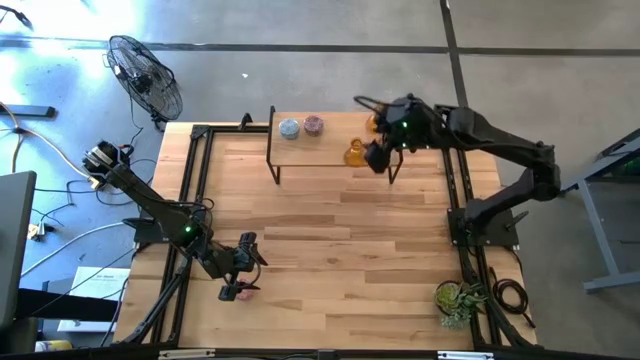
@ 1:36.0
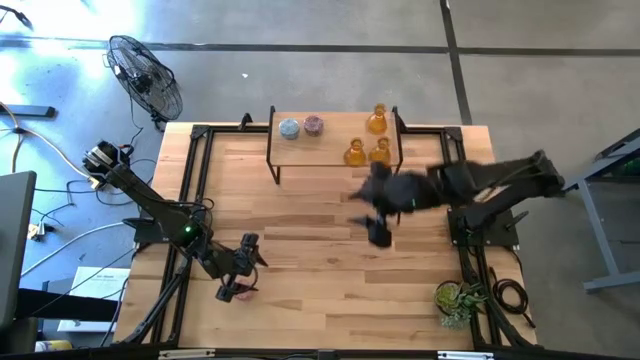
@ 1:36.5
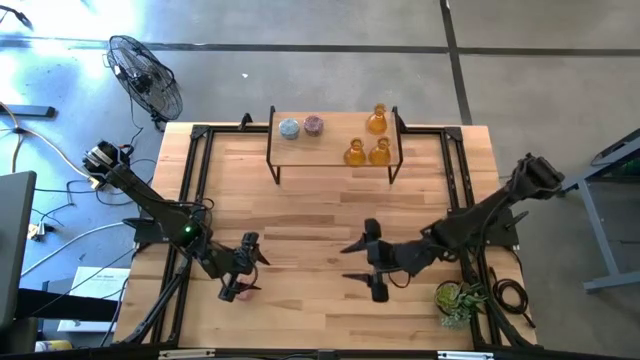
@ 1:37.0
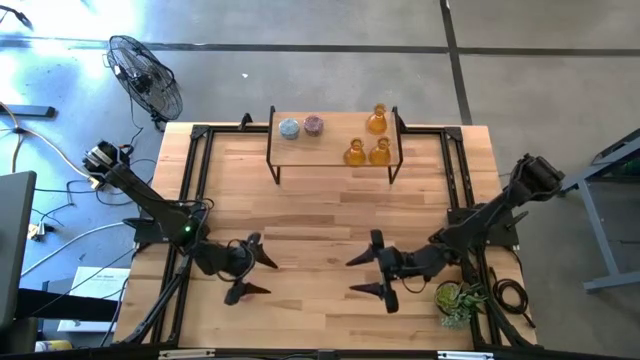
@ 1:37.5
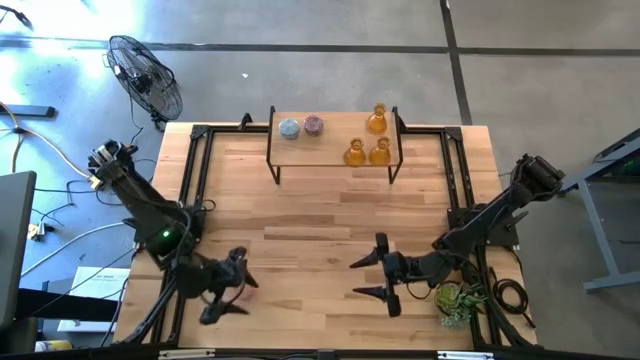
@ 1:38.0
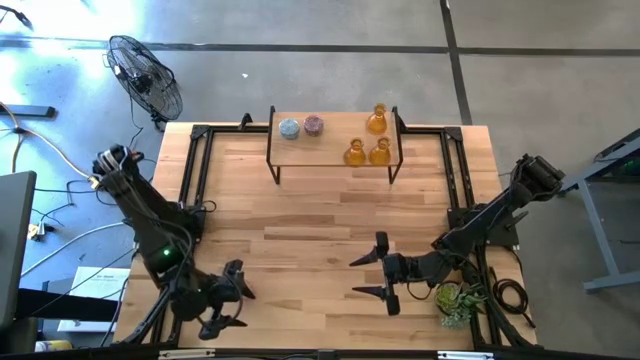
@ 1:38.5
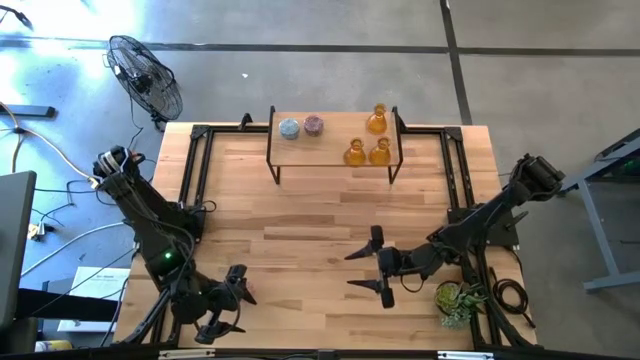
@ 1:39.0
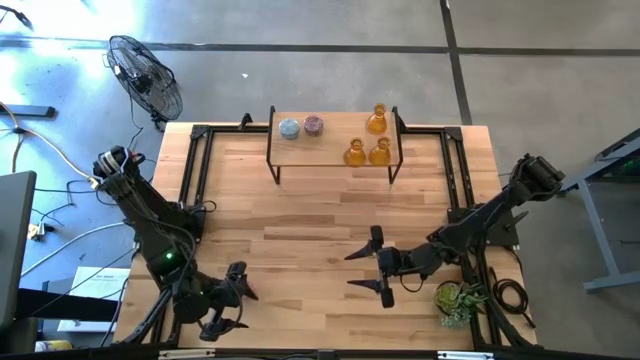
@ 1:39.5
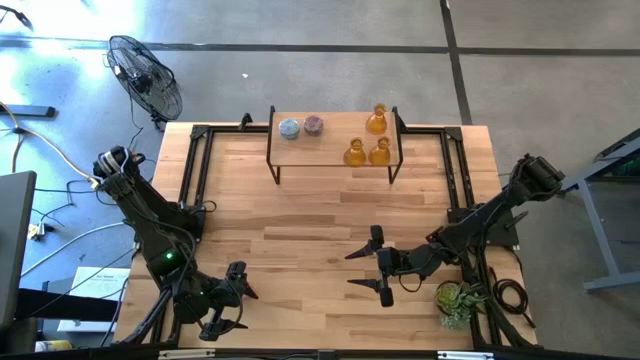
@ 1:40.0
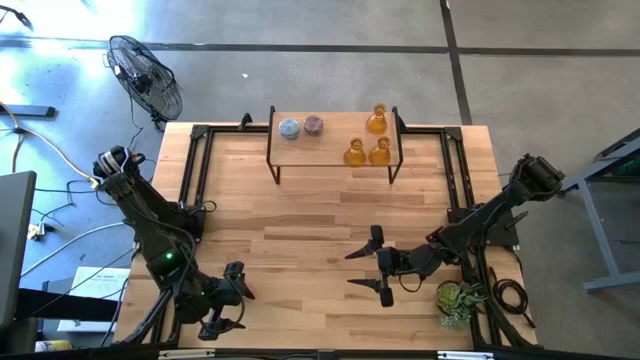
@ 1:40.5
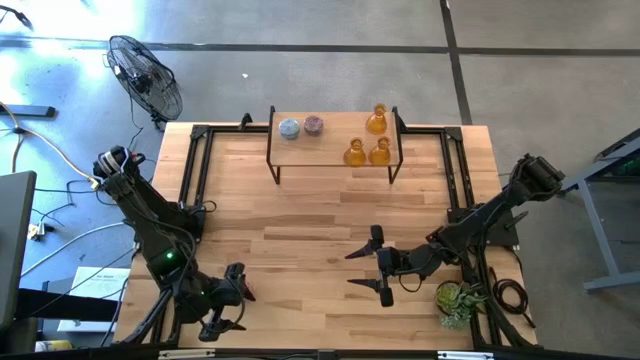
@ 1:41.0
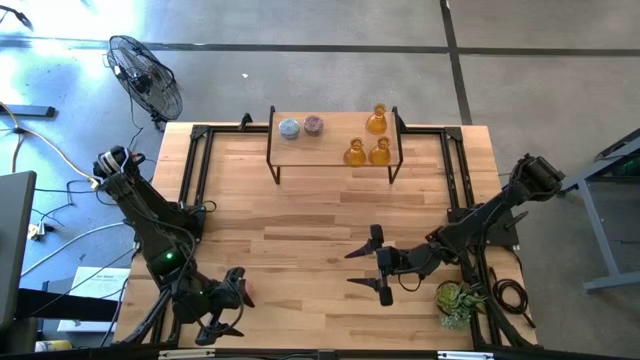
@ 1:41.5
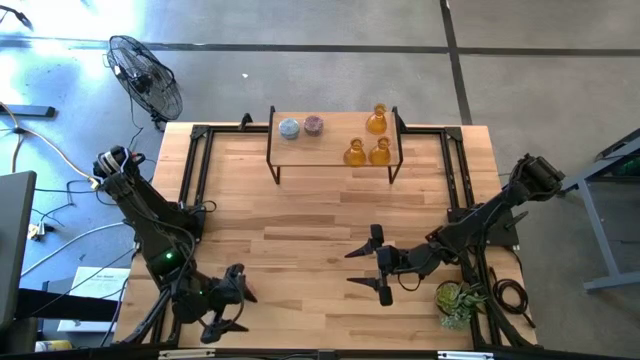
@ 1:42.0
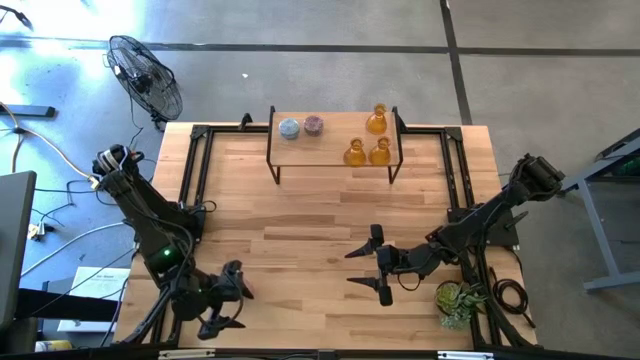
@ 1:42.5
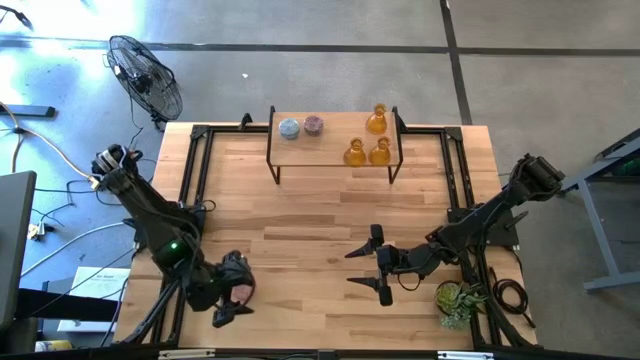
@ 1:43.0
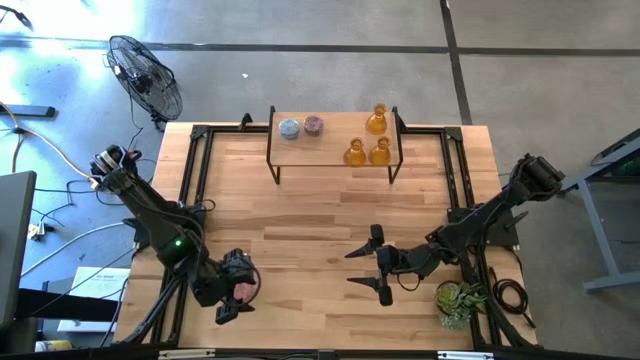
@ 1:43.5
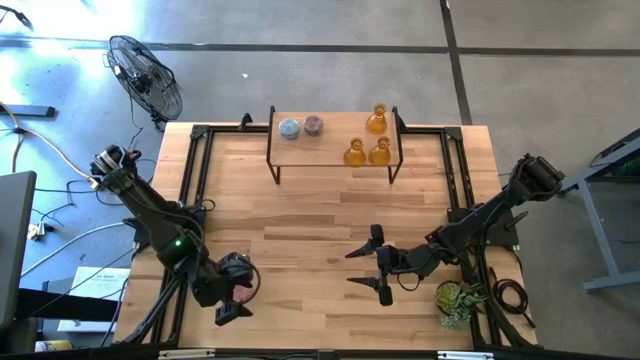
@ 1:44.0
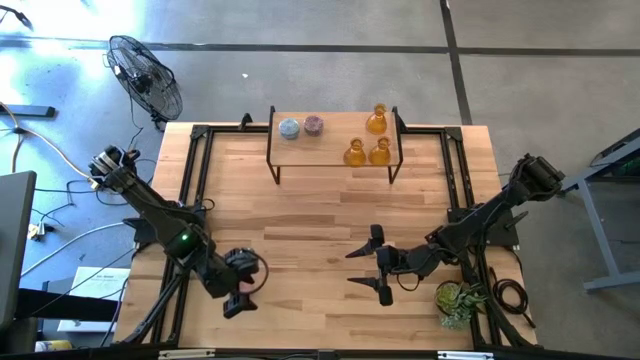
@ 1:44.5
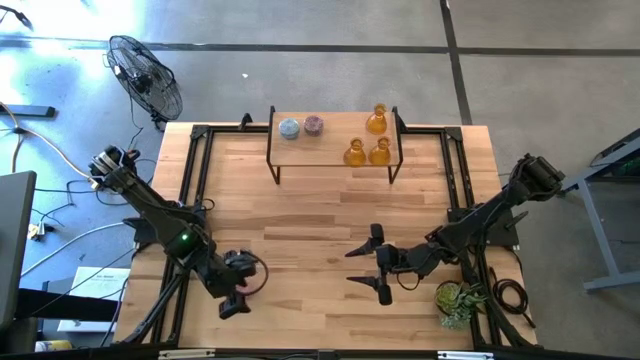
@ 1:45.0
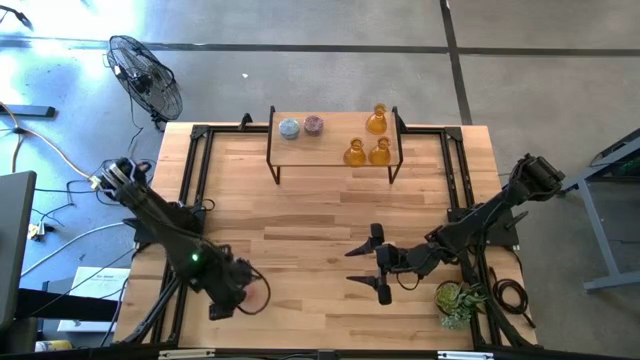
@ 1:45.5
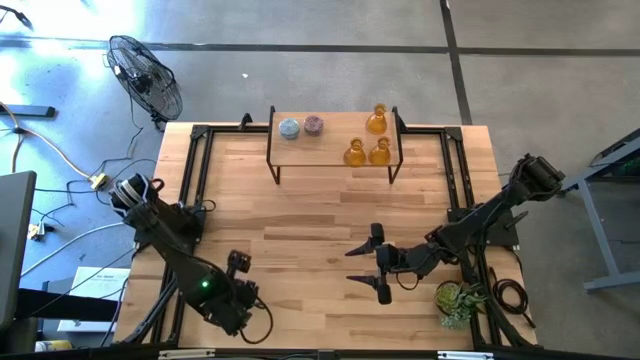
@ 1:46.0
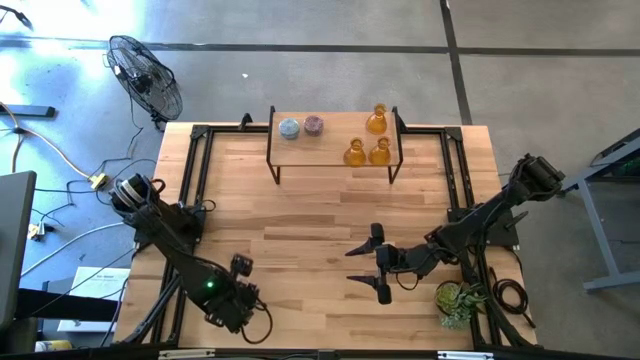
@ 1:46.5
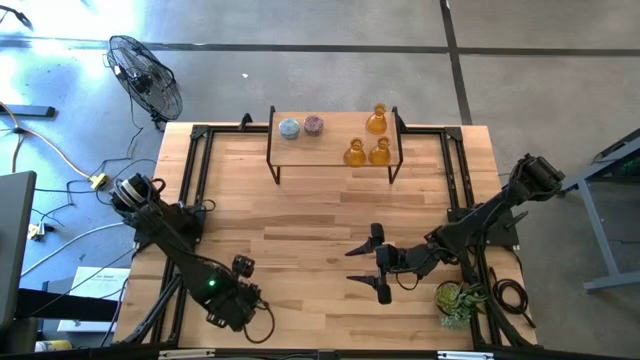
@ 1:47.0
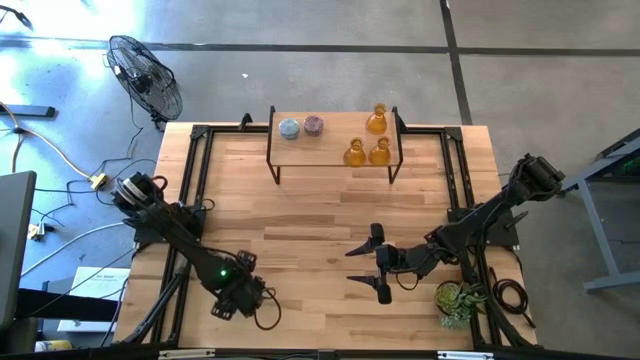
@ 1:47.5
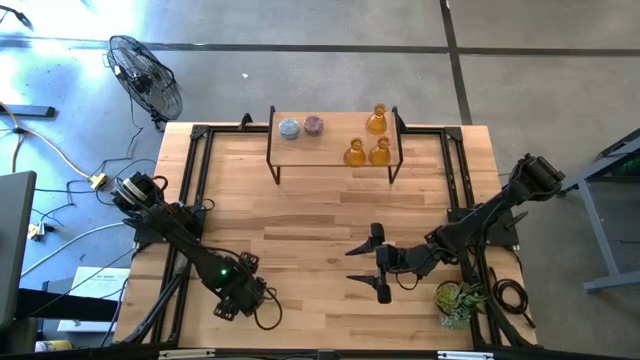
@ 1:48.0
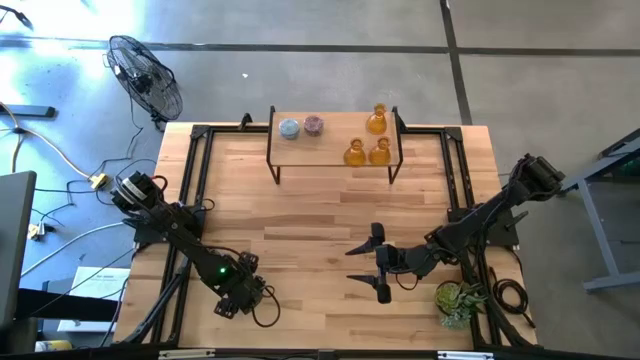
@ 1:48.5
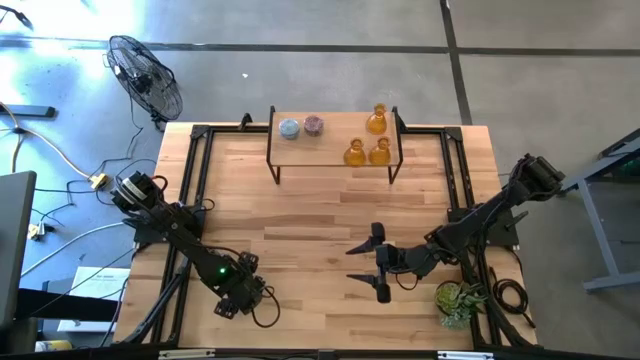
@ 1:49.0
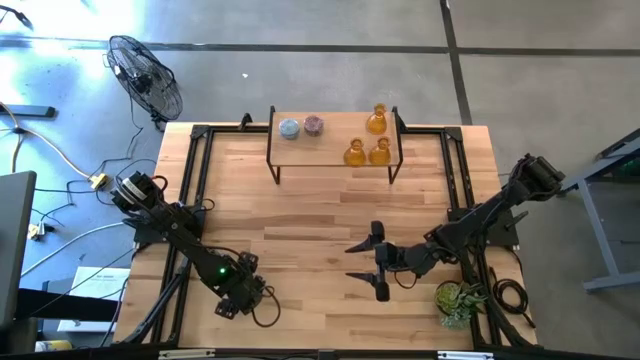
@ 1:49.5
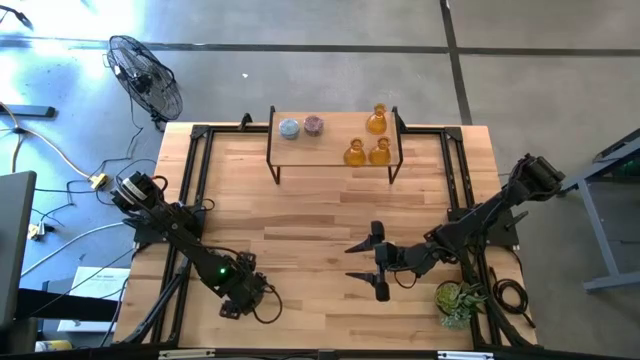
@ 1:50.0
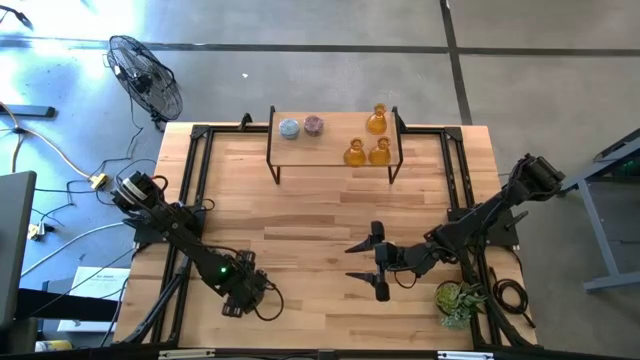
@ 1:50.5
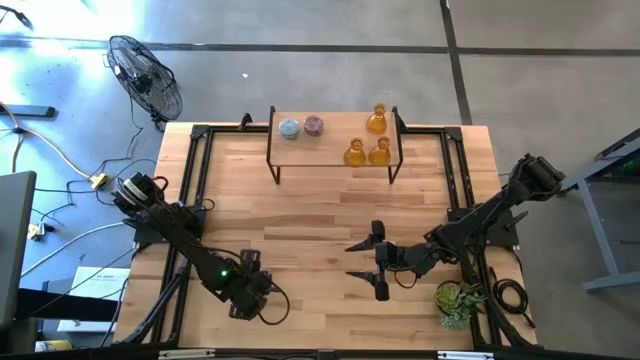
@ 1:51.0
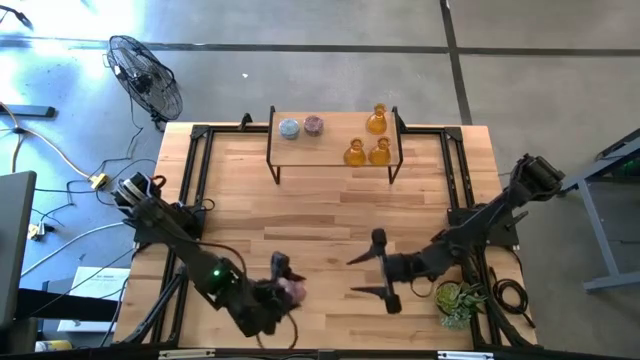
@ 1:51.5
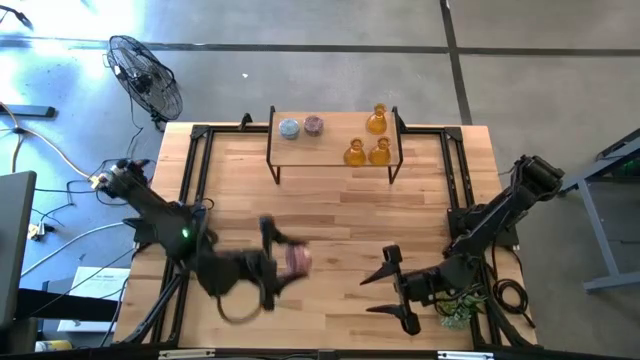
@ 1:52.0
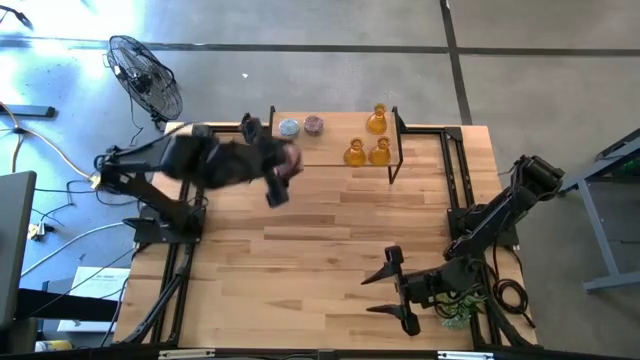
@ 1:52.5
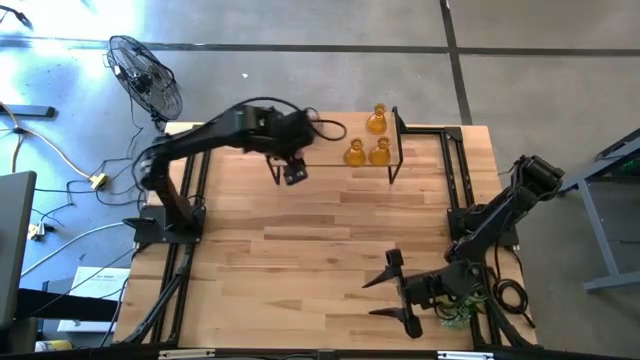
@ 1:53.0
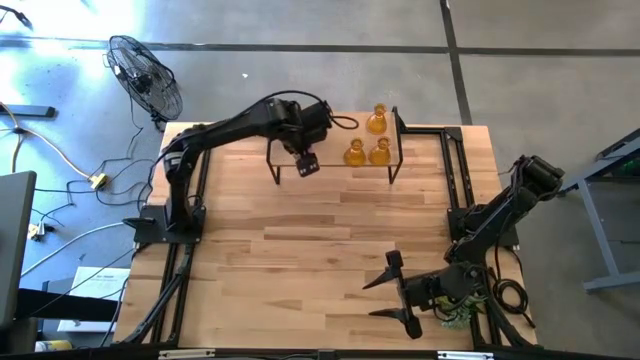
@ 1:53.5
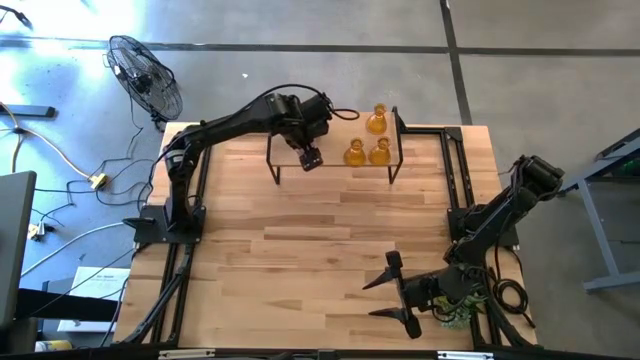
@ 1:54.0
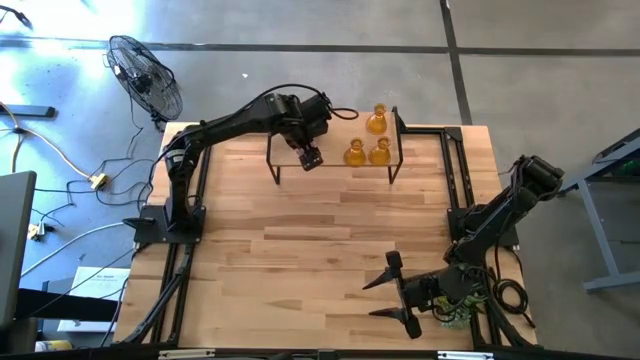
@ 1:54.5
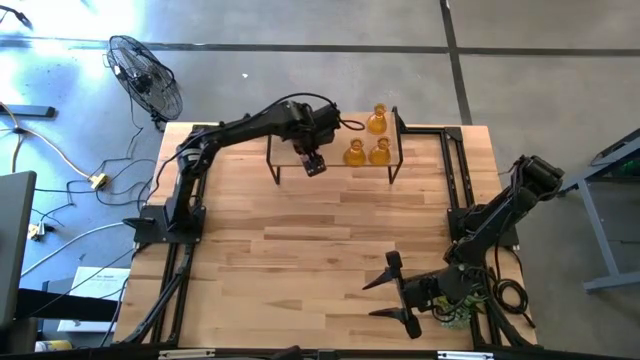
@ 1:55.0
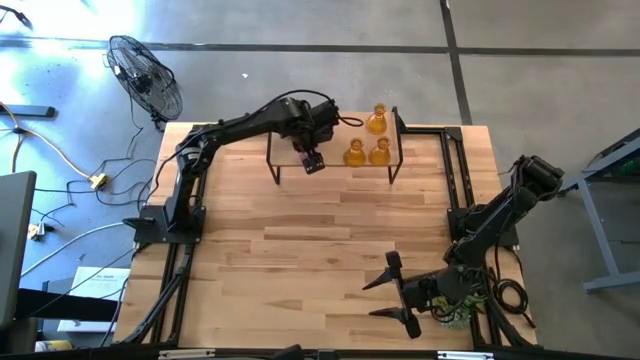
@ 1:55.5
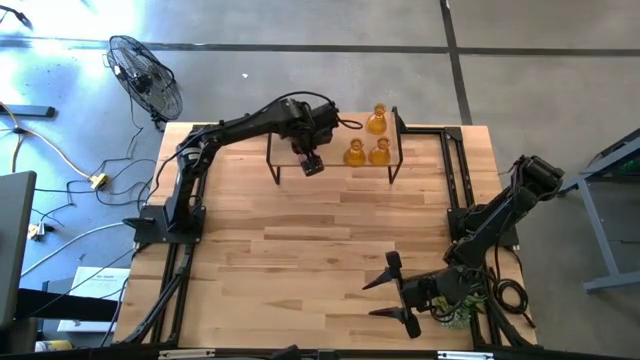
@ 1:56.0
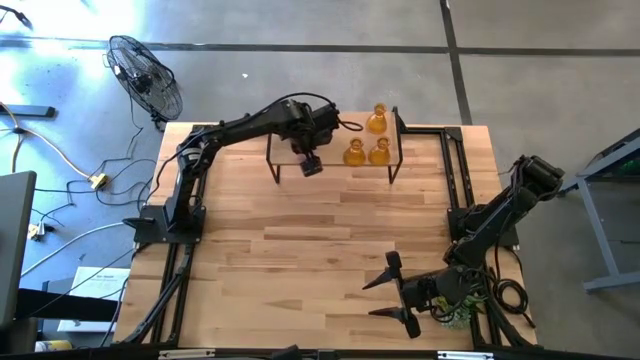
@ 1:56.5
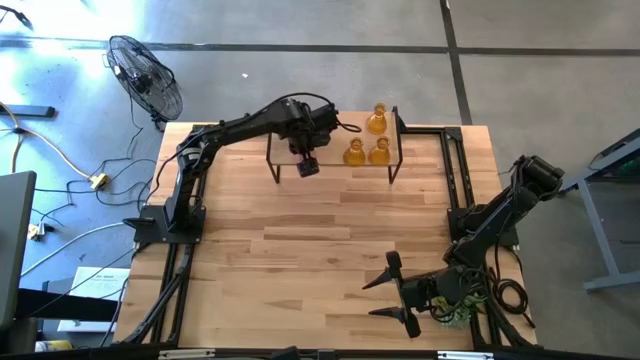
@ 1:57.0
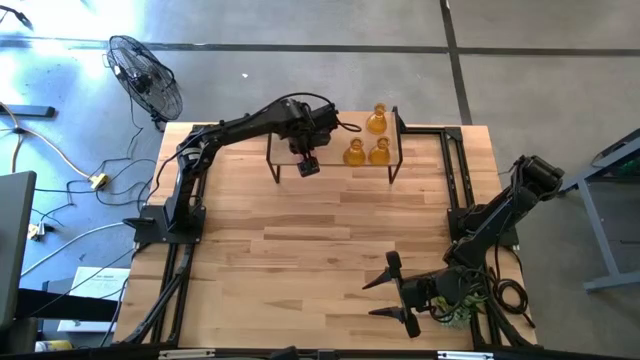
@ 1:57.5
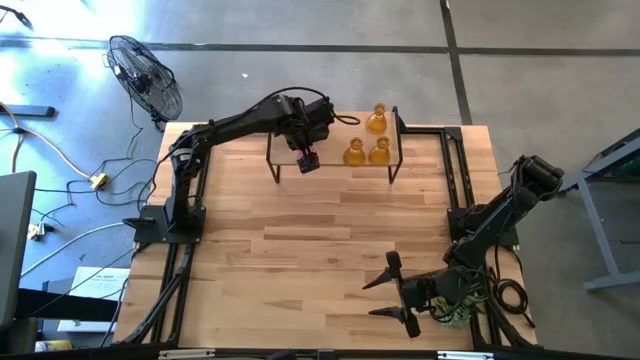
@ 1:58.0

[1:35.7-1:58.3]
Task: Pick & Place candle stick holders
Put the pink patterned candle on the shelf
